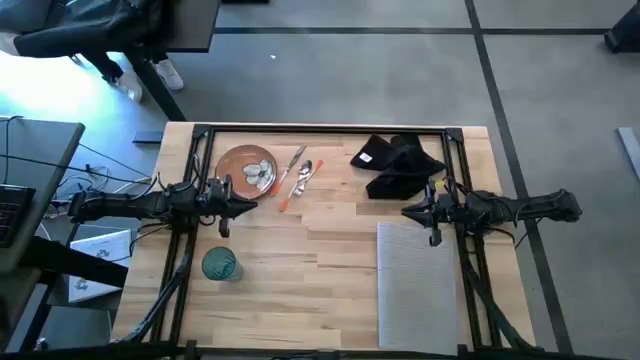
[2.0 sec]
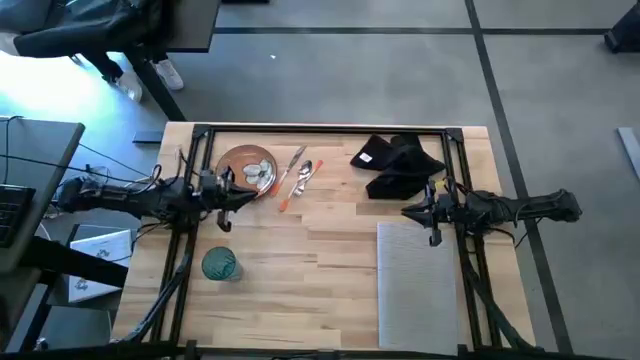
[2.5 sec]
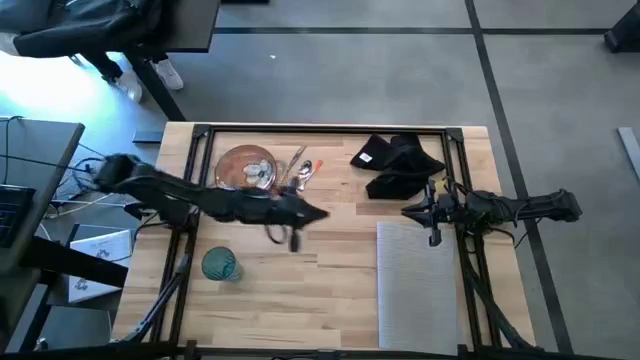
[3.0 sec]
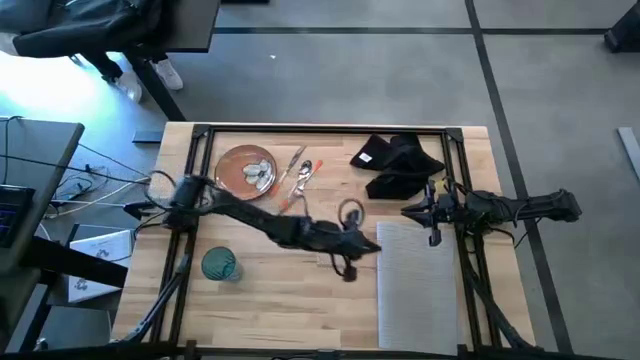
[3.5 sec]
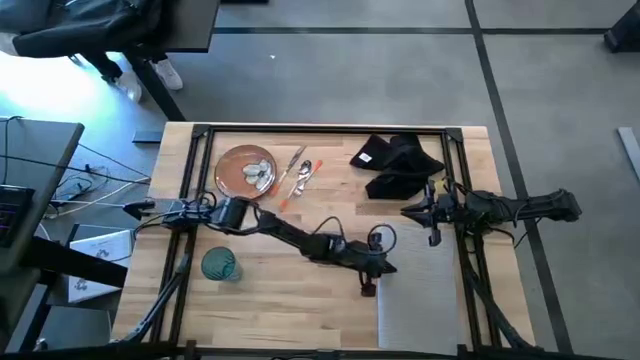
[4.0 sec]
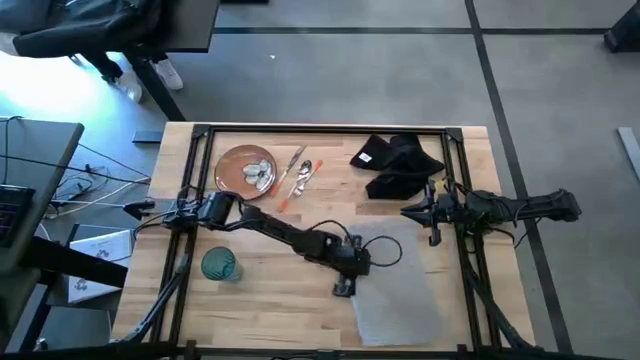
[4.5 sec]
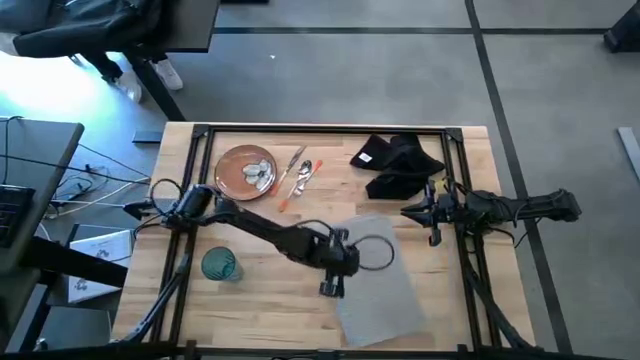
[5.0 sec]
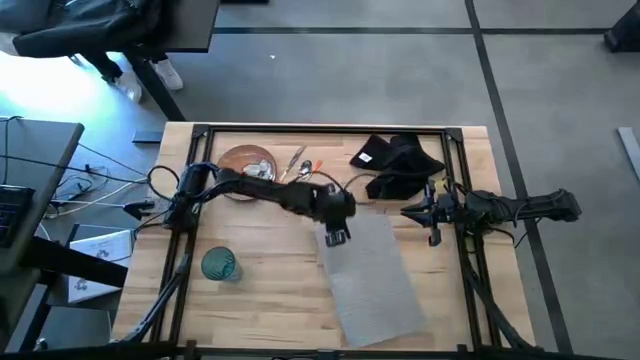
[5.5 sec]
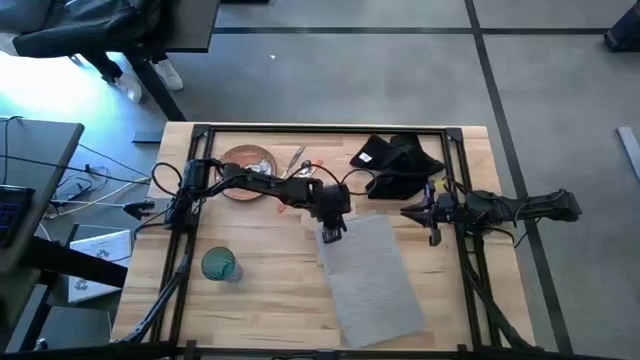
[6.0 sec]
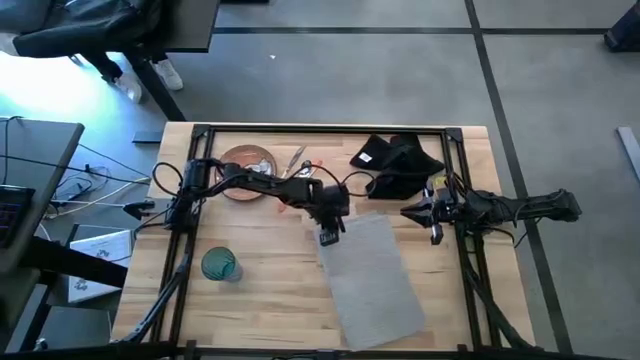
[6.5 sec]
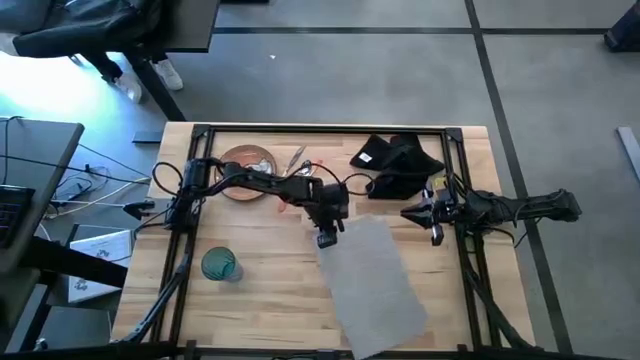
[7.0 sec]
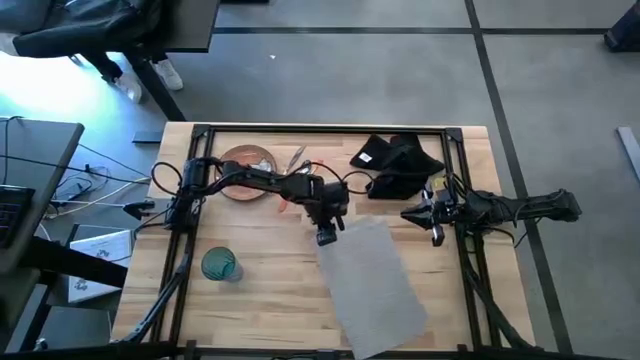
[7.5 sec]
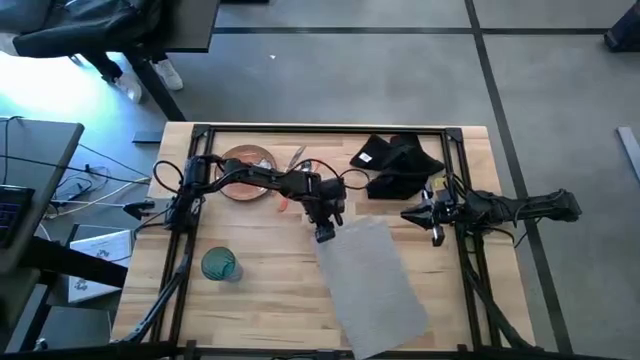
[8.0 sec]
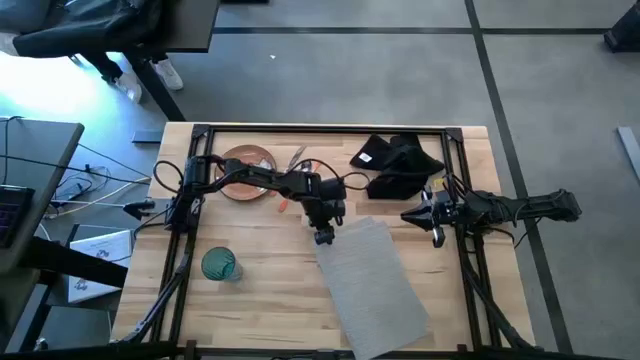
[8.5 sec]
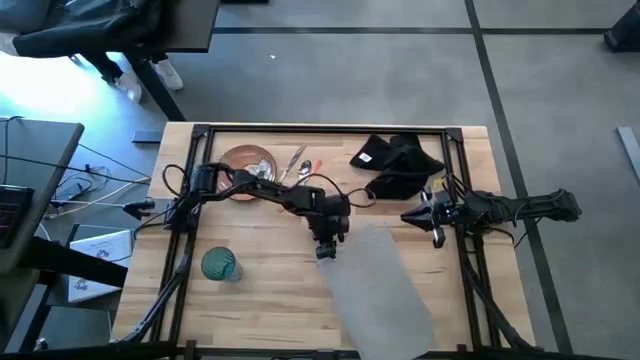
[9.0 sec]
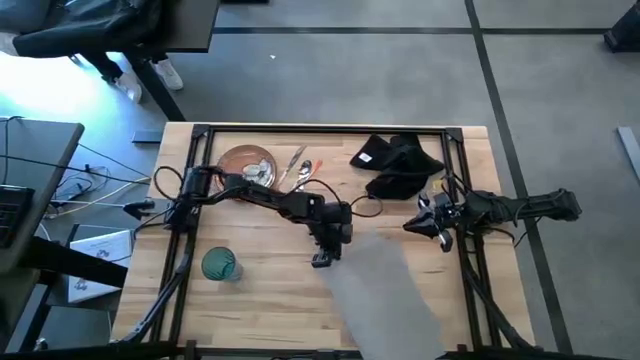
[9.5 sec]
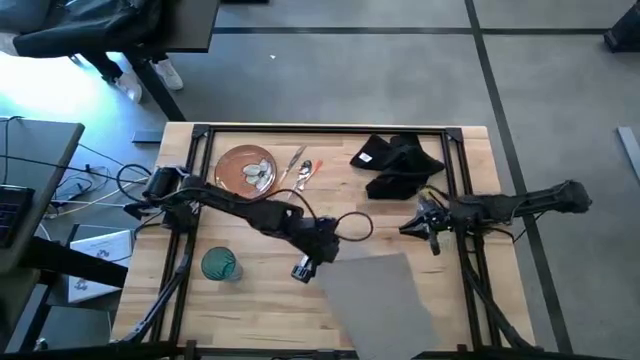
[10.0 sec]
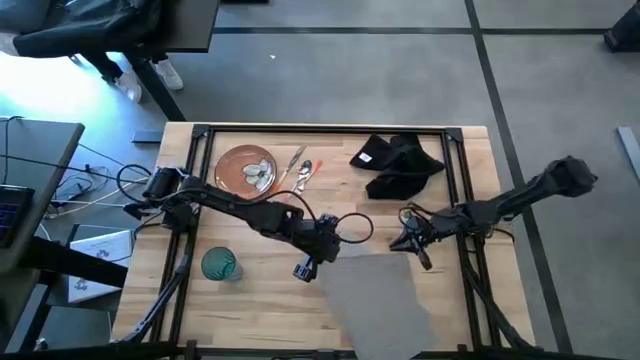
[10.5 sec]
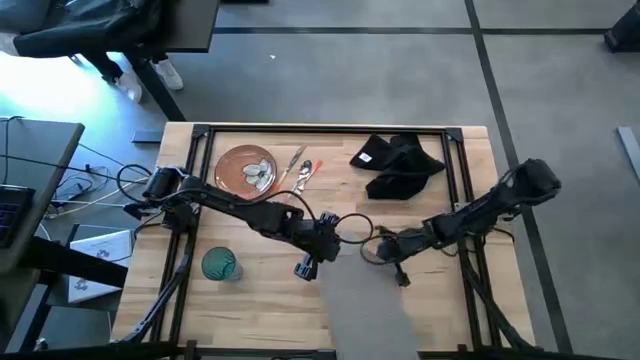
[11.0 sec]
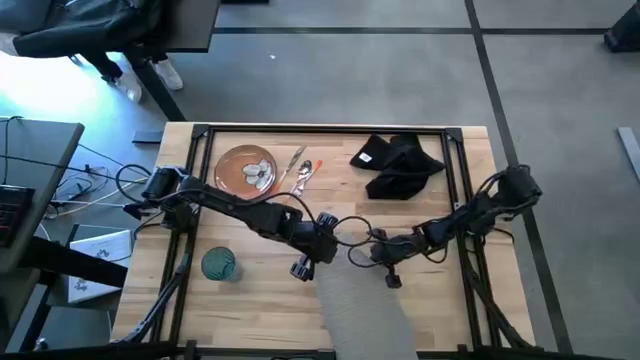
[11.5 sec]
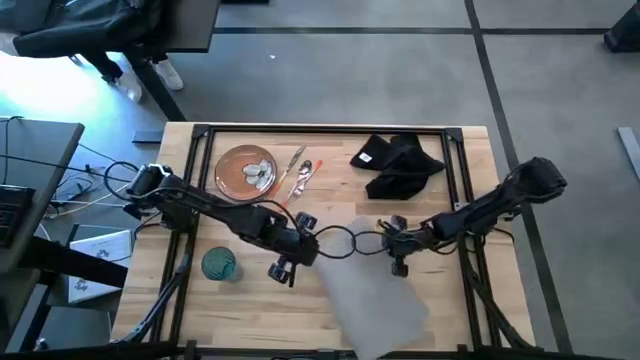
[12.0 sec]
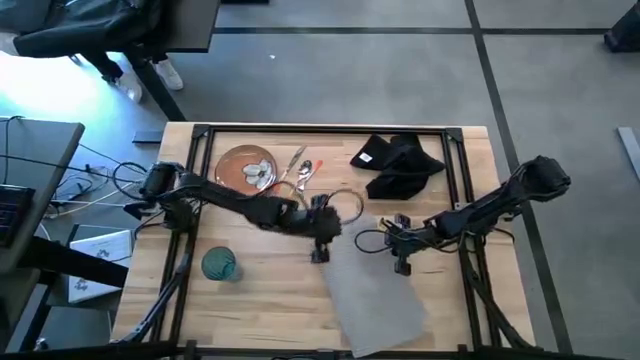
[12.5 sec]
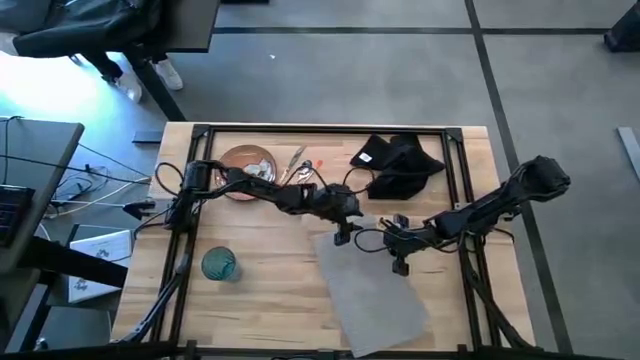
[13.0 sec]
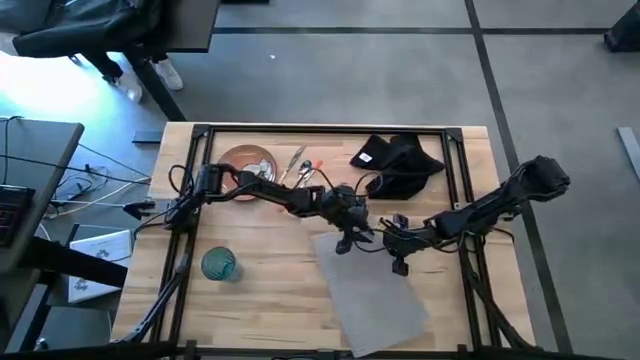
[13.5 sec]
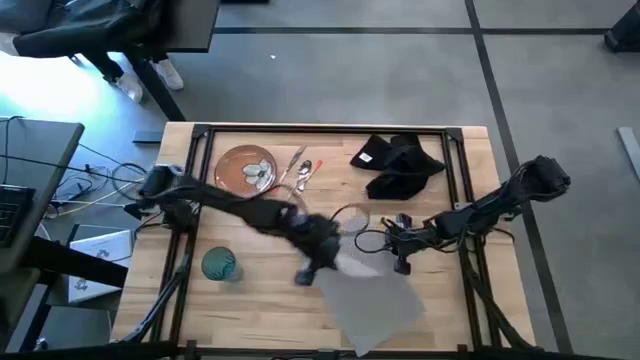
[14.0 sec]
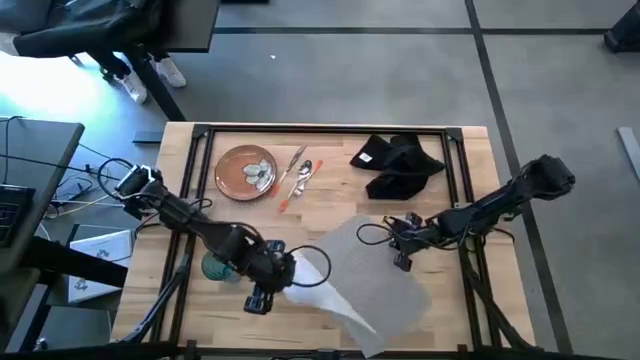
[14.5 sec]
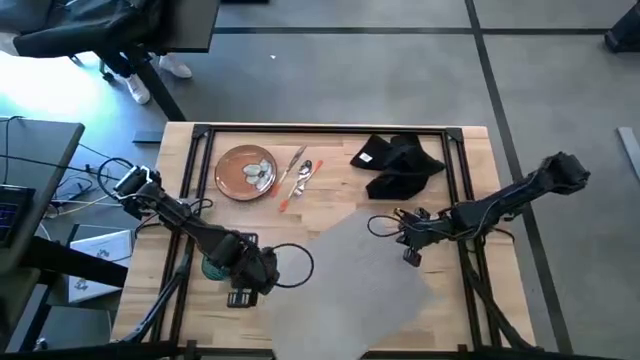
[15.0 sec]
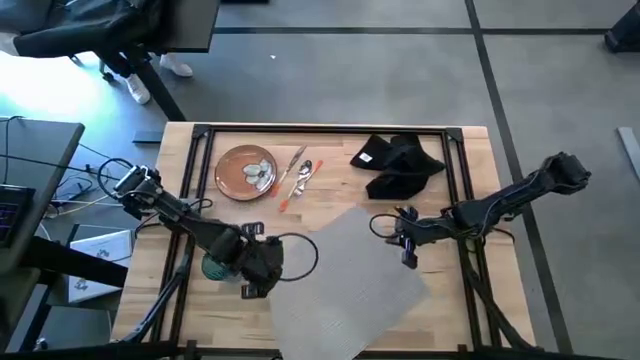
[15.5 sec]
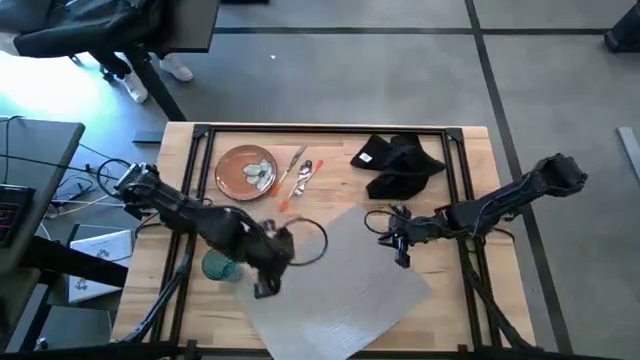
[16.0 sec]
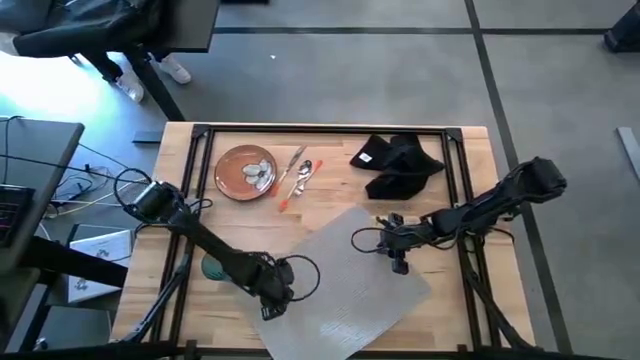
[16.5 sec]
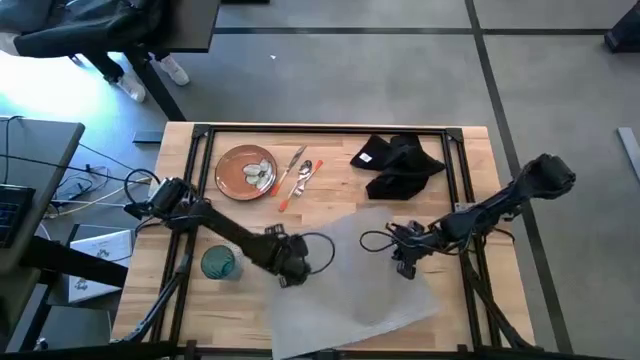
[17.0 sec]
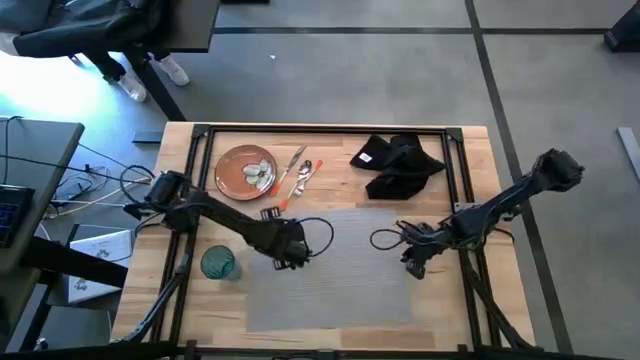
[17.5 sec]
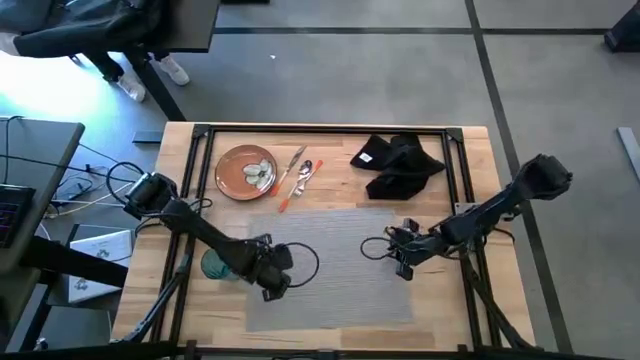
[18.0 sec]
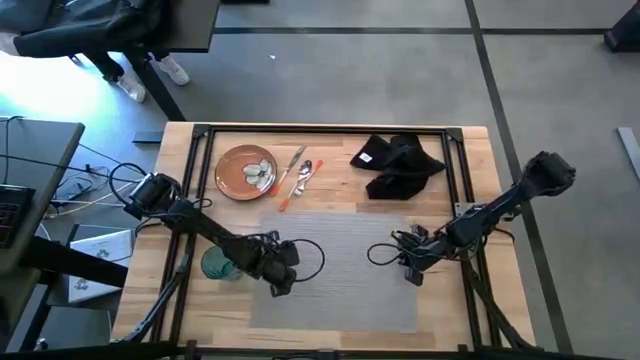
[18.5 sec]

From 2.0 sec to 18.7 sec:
Task: Set table place
Prepare the gray mat

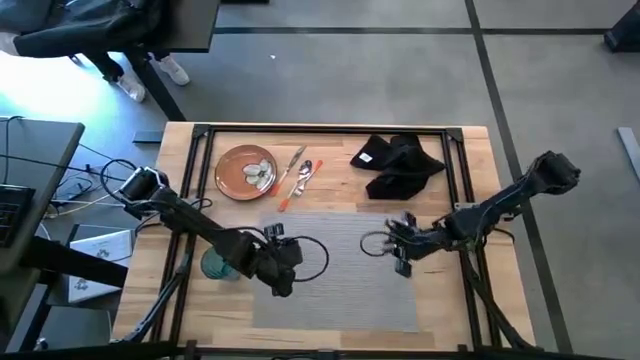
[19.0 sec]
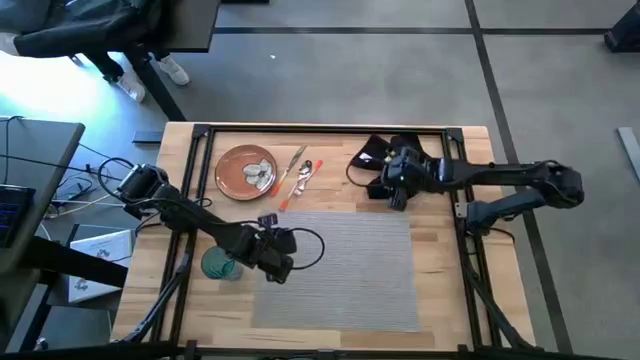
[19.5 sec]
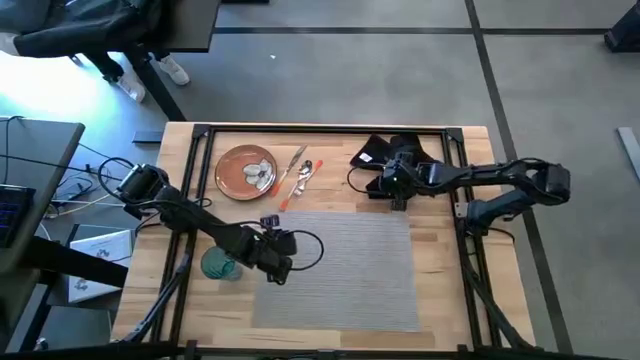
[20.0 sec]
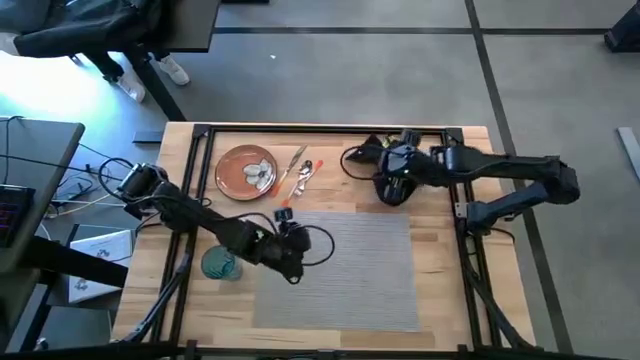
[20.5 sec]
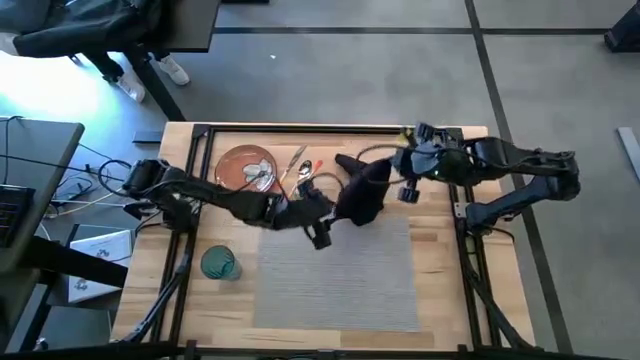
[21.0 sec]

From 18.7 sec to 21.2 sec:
Fold the black napkin

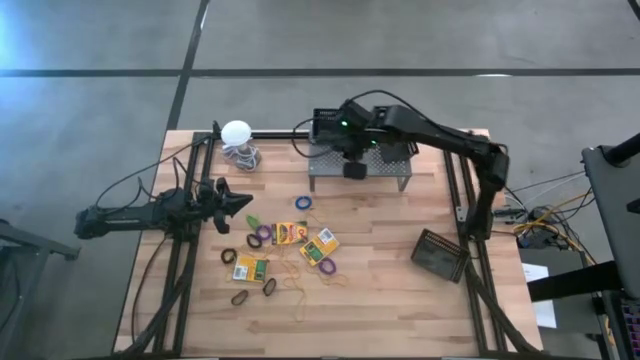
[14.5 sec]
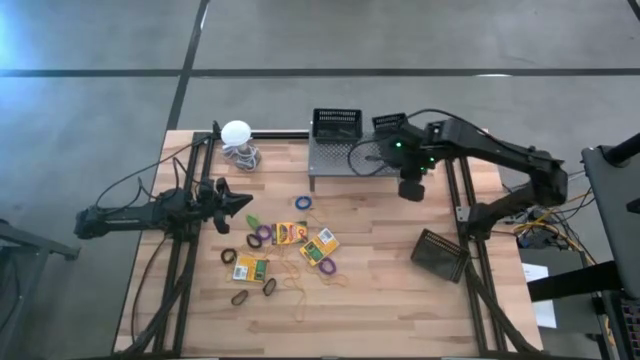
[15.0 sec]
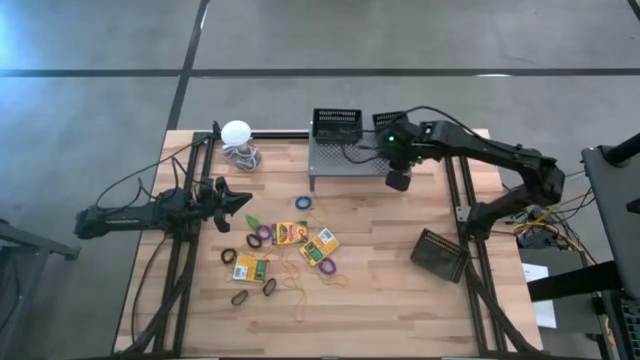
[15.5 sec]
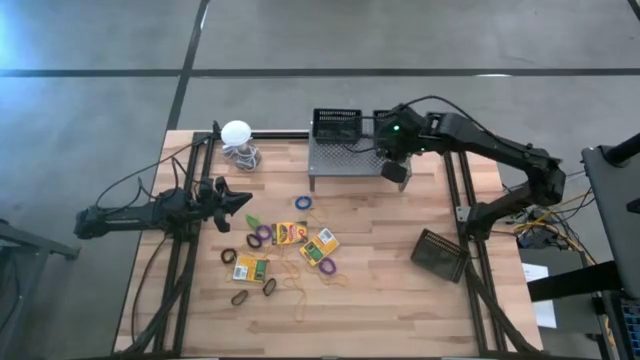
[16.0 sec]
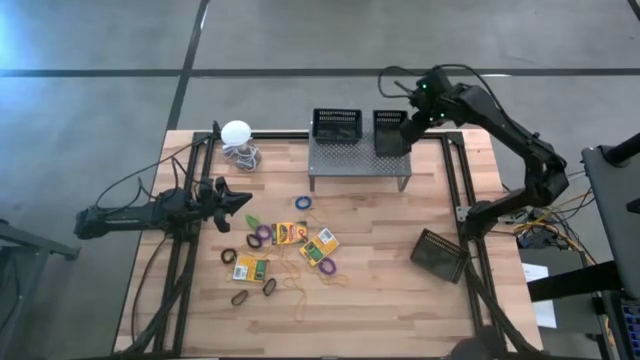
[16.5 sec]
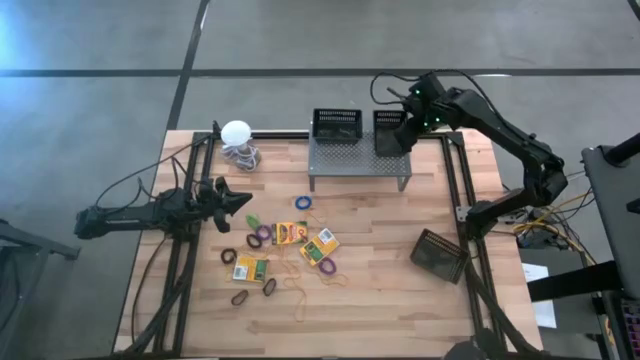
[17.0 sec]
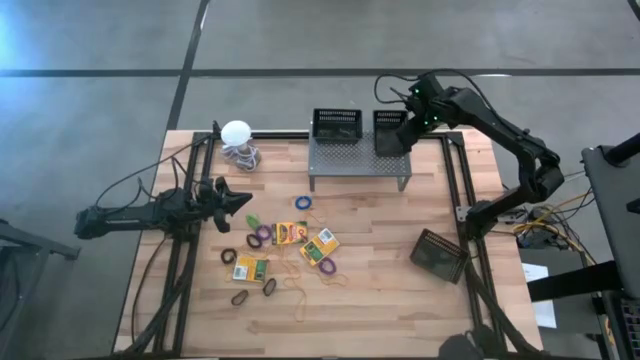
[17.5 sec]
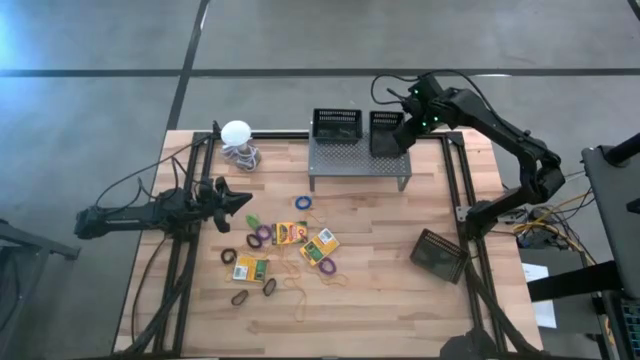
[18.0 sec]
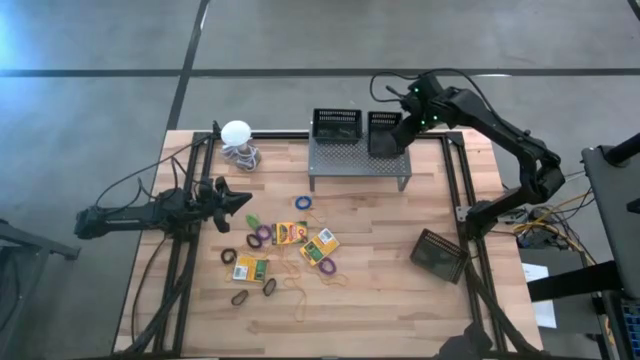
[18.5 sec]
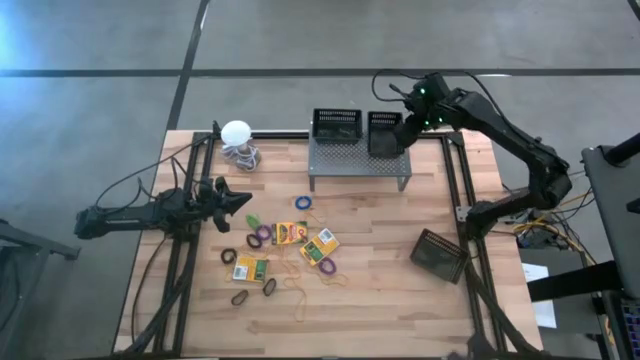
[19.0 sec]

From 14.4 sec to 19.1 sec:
Task: Pick & Place Office Desk Supplies
Adjust the right black bin on the shelf
